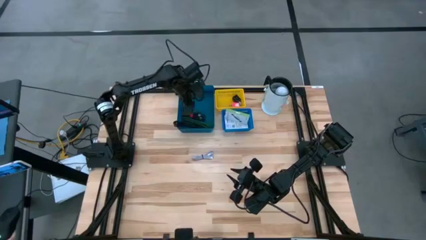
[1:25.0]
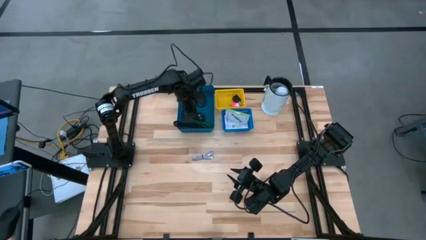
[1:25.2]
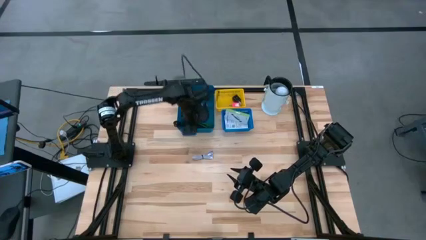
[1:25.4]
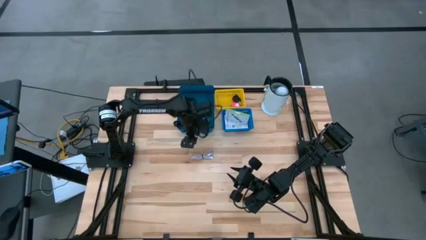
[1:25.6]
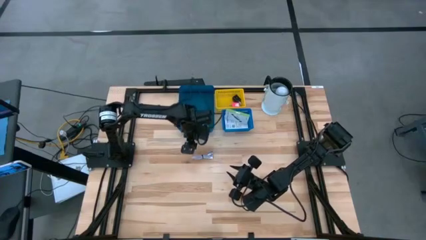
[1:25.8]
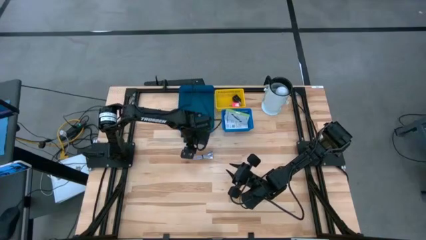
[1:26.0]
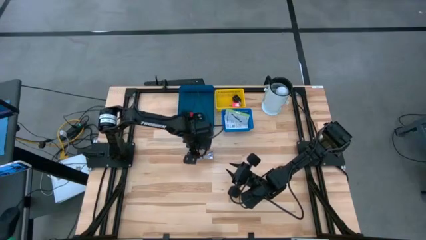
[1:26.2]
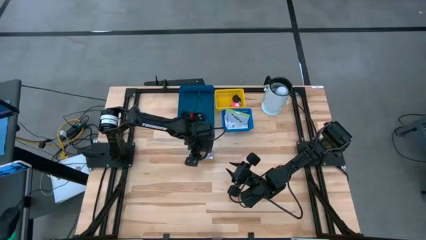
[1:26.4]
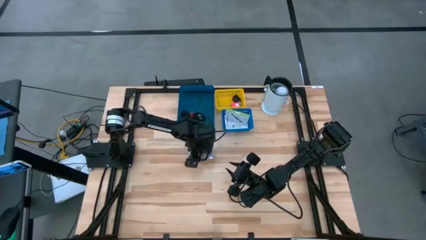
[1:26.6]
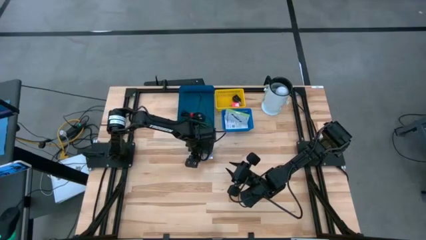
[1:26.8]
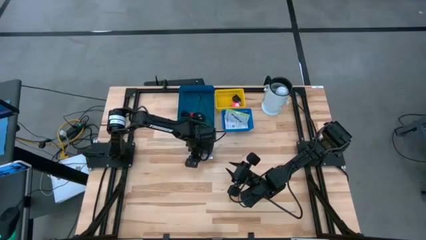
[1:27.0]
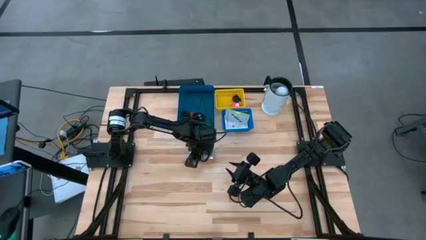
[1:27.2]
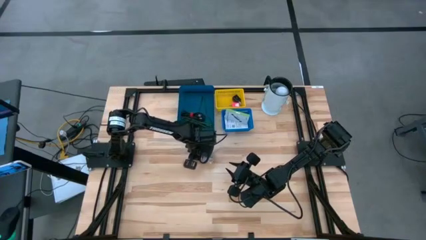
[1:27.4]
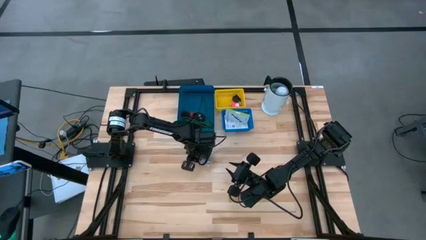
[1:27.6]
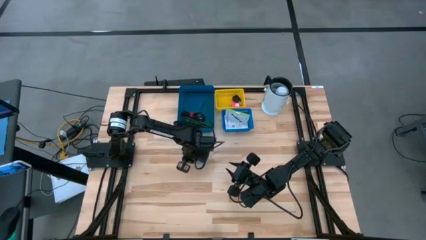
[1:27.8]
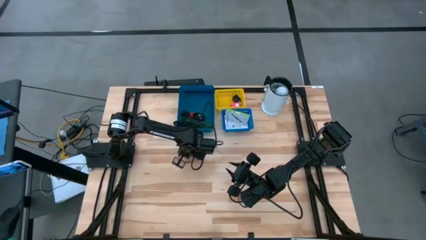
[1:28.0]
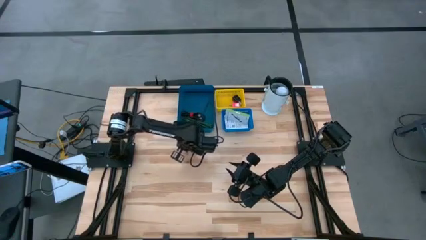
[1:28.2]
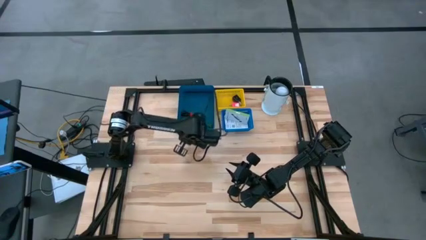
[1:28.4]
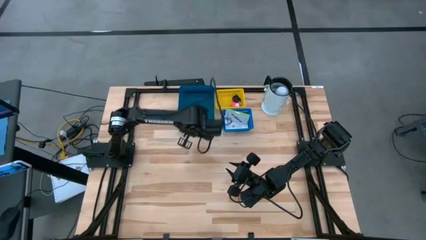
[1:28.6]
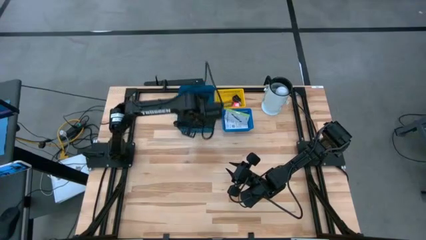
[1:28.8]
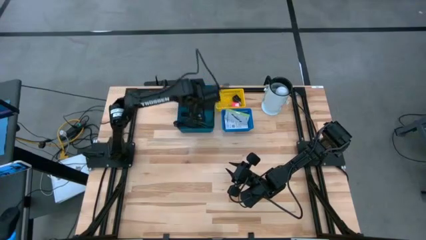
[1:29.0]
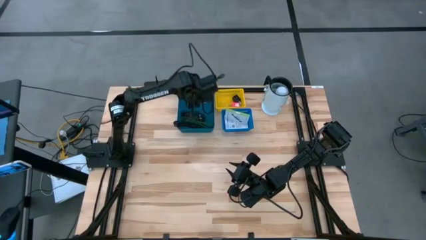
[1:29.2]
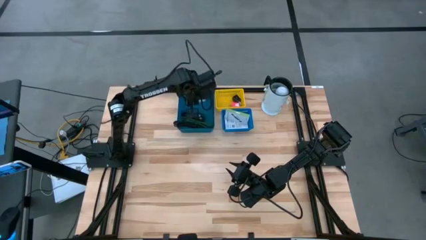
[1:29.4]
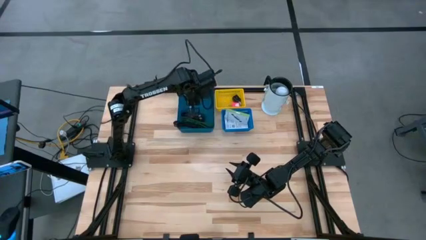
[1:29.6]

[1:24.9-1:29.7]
Task: Pick and place items into bin
Put the white charger cable into the dark blue bin

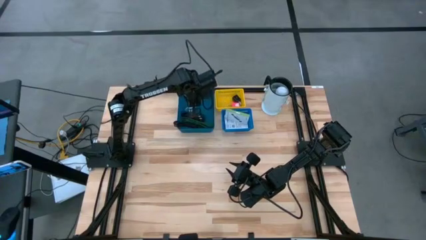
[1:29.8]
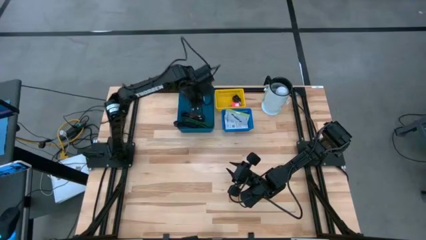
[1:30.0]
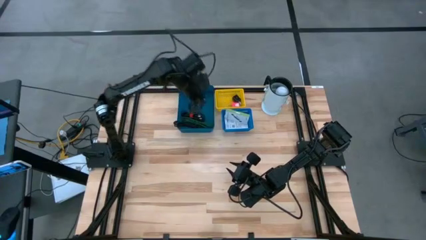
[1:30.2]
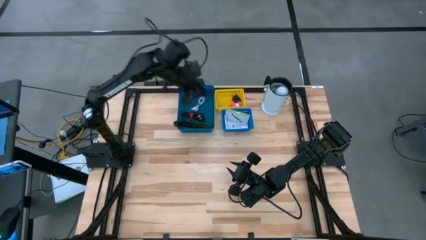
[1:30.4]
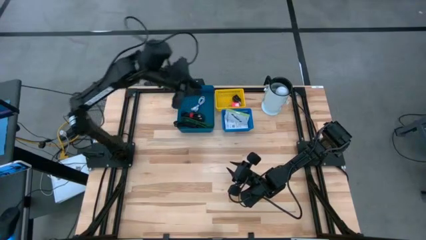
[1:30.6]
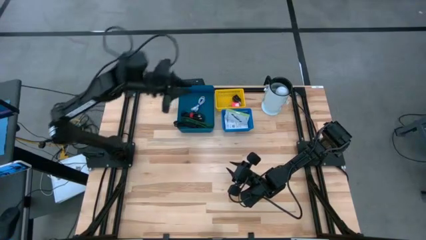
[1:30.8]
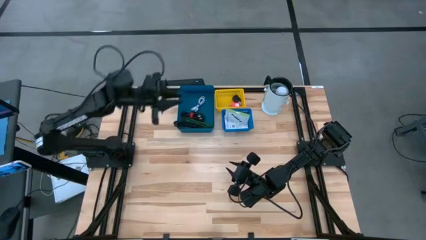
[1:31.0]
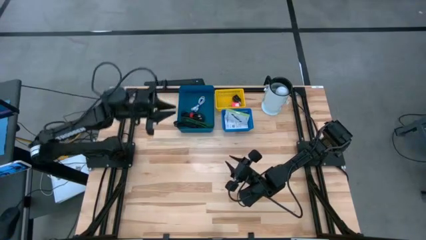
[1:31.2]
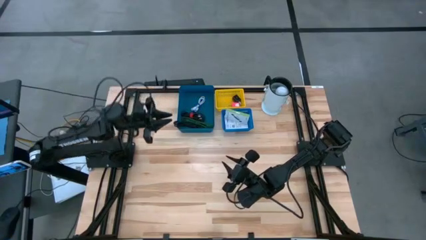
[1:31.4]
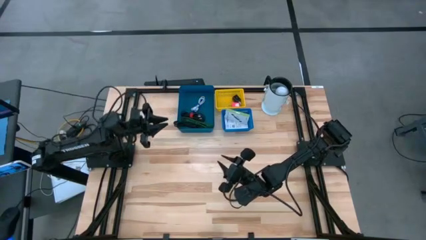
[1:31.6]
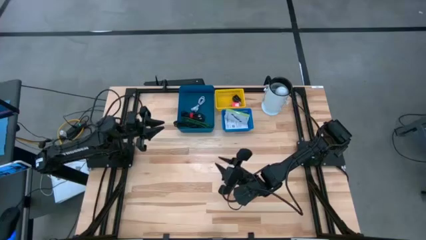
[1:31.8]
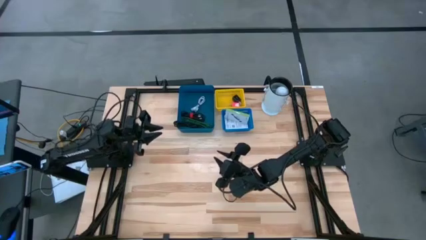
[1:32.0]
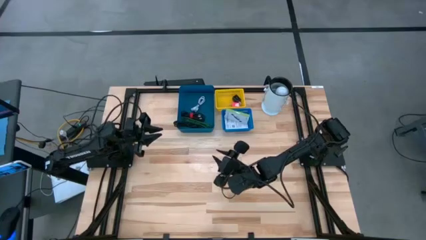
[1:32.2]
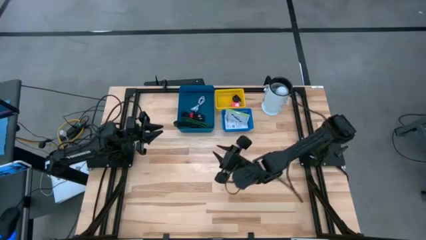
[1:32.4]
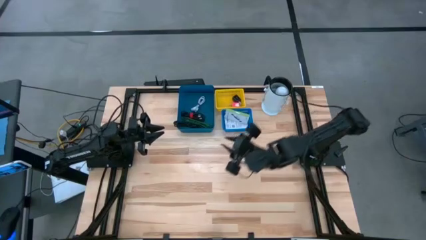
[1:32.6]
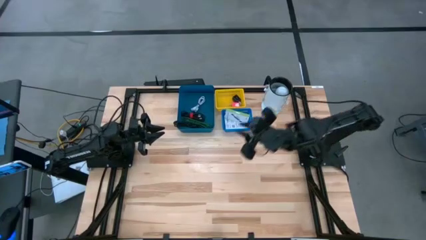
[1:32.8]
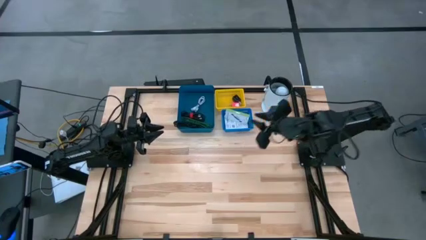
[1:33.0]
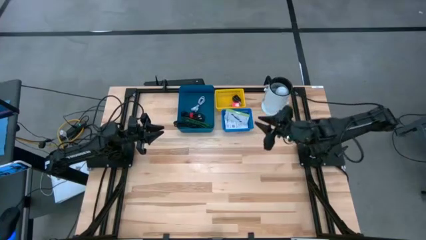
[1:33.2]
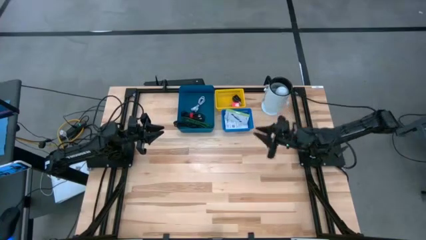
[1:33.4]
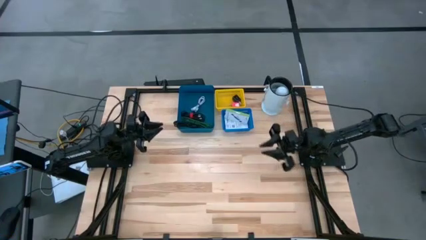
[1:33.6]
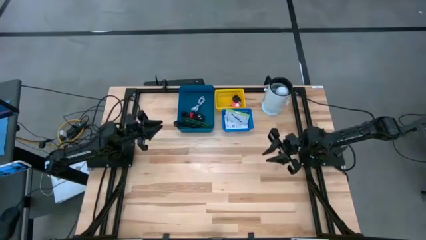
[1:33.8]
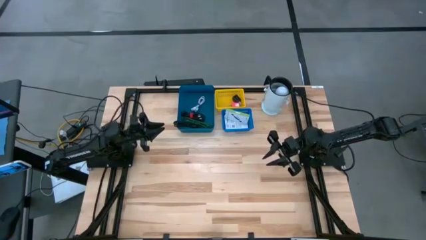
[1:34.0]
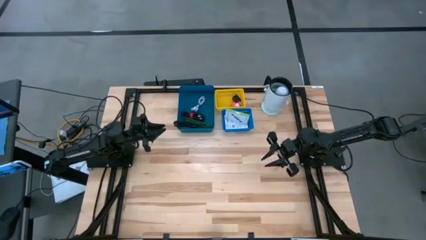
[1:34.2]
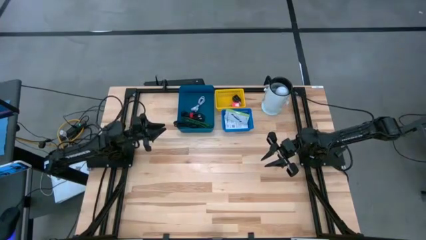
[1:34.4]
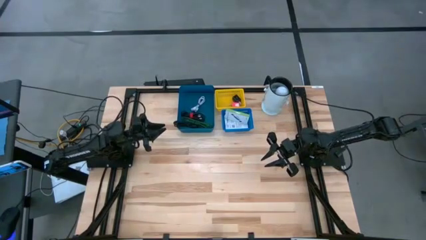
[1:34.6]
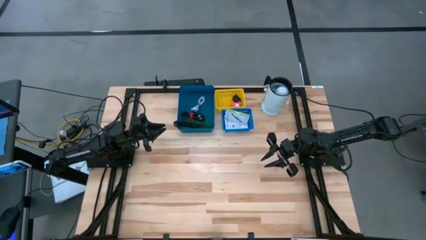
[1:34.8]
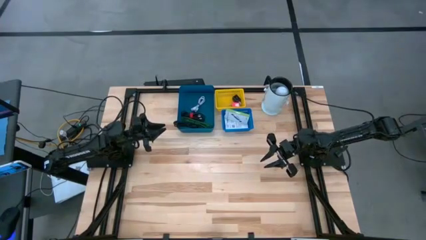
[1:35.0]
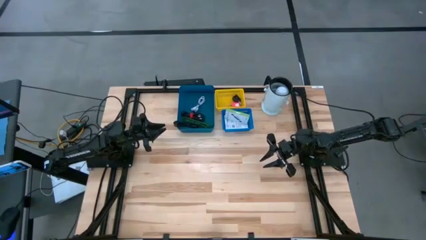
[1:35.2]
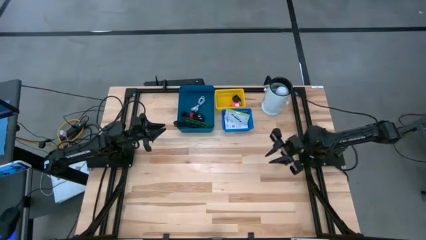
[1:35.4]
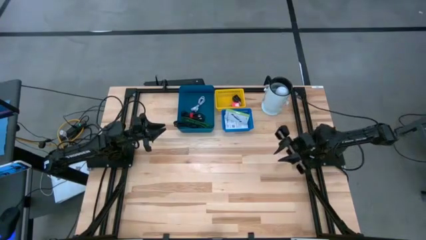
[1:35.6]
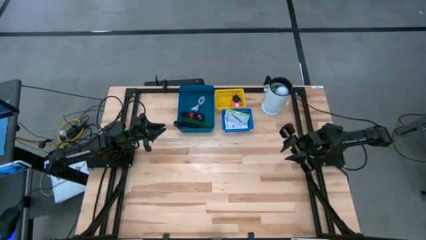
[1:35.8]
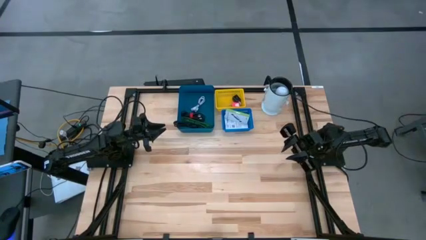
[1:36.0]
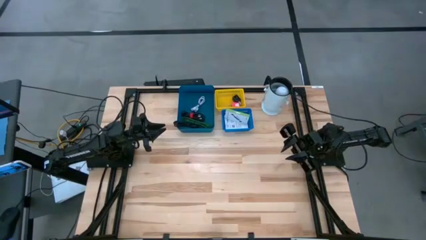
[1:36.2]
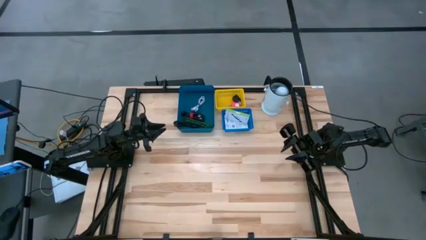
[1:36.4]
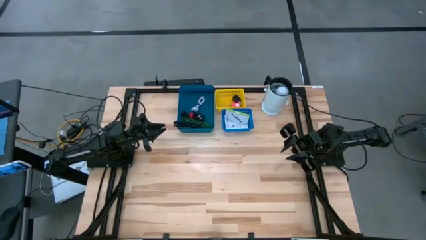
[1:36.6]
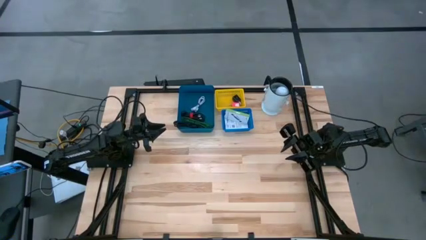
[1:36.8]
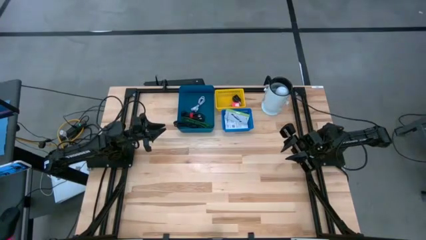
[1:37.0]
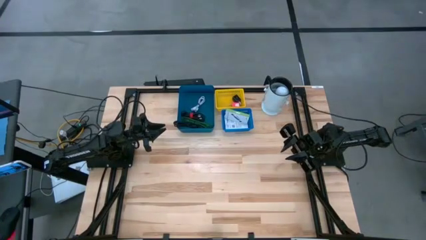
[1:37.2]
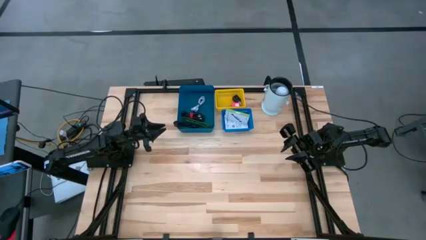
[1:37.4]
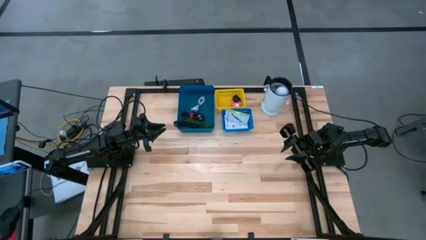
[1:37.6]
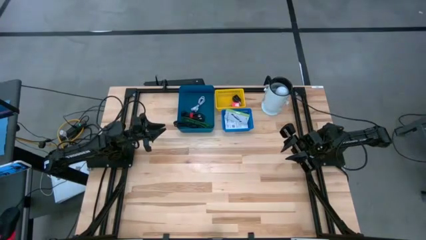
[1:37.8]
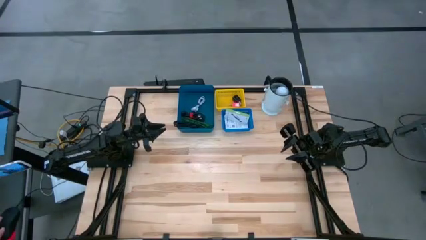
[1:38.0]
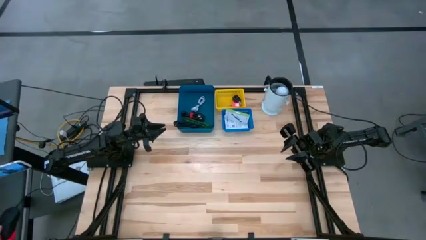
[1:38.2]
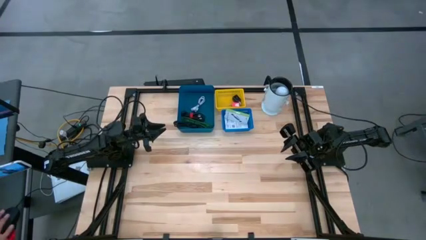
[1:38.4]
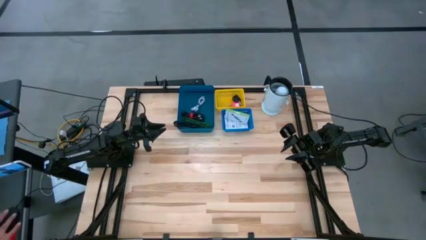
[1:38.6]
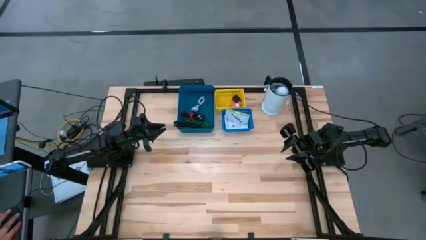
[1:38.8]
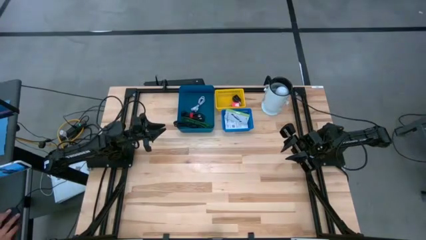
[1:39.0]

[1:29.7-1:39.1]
Return to Home Position
